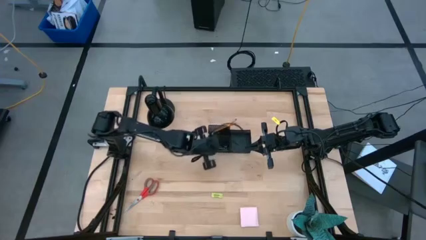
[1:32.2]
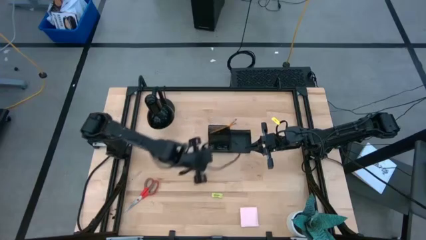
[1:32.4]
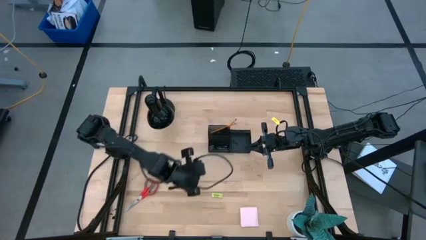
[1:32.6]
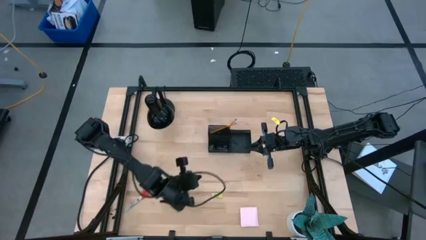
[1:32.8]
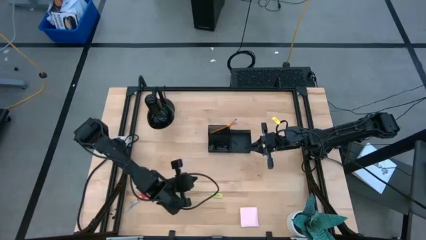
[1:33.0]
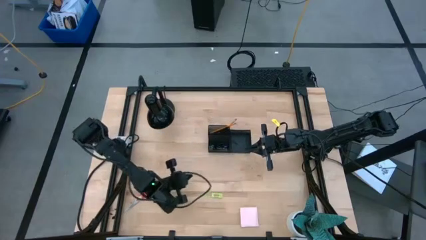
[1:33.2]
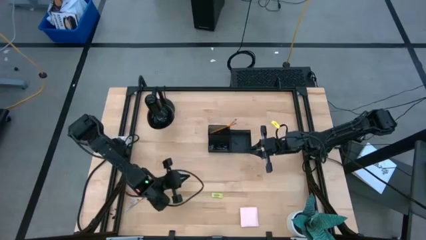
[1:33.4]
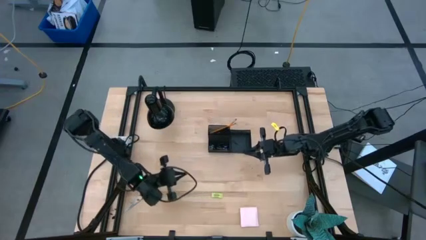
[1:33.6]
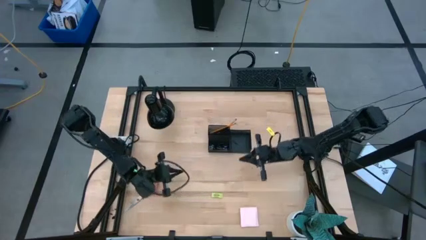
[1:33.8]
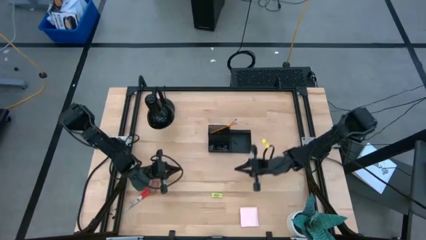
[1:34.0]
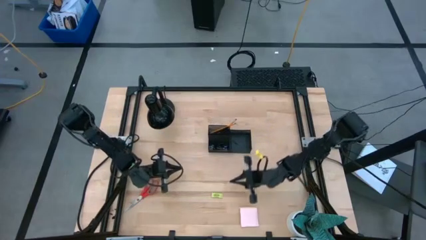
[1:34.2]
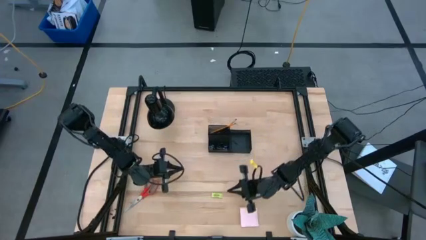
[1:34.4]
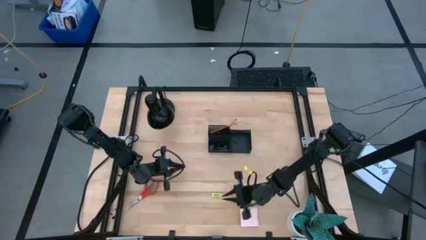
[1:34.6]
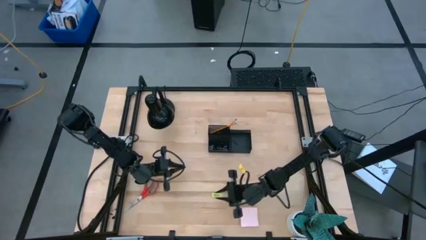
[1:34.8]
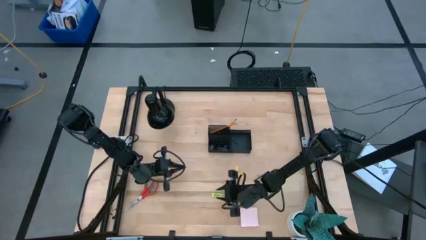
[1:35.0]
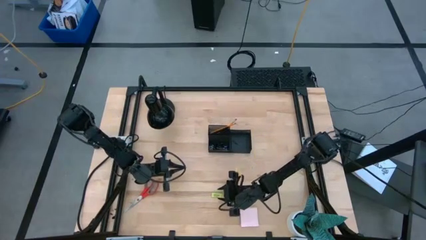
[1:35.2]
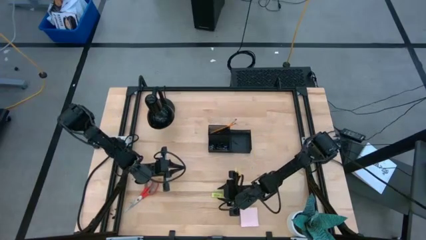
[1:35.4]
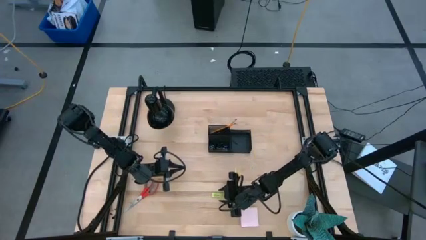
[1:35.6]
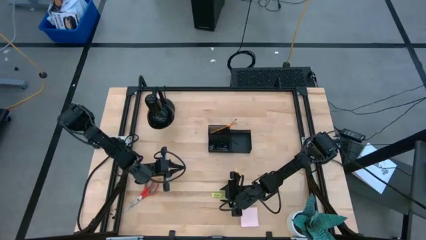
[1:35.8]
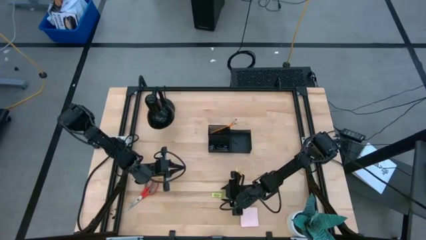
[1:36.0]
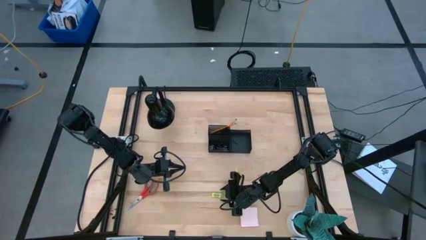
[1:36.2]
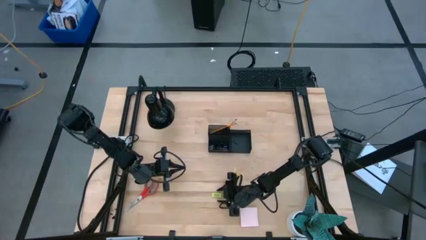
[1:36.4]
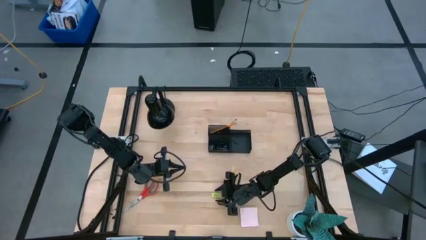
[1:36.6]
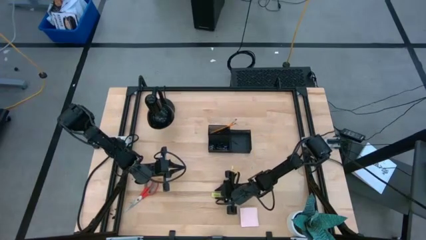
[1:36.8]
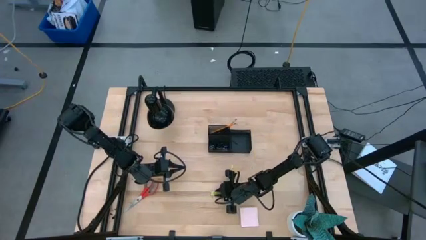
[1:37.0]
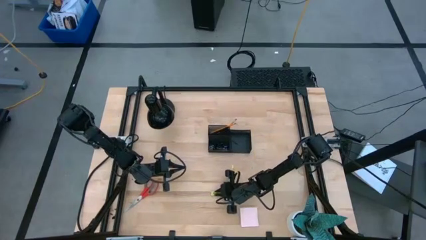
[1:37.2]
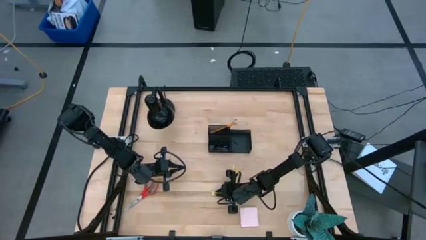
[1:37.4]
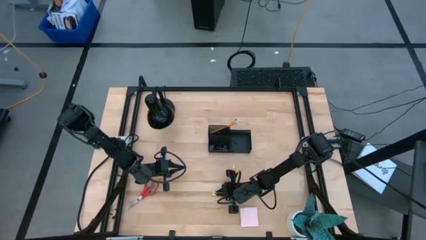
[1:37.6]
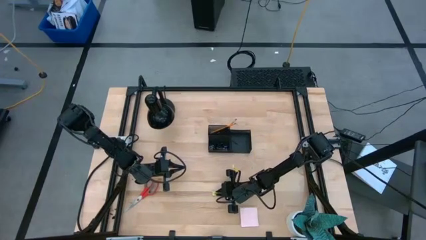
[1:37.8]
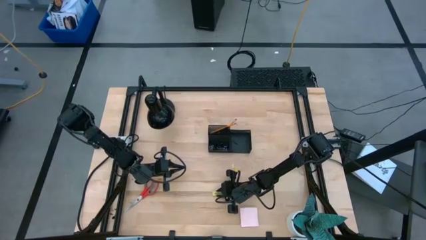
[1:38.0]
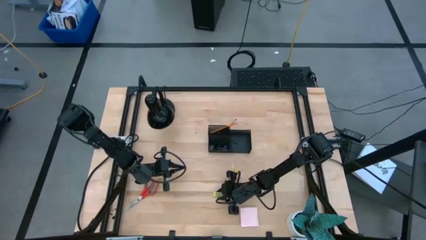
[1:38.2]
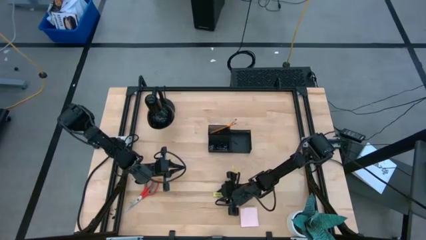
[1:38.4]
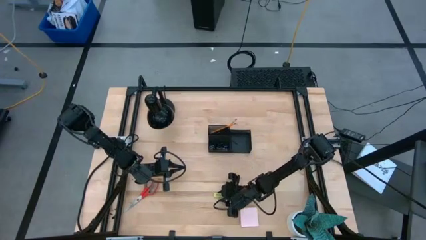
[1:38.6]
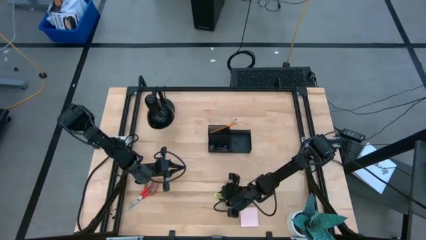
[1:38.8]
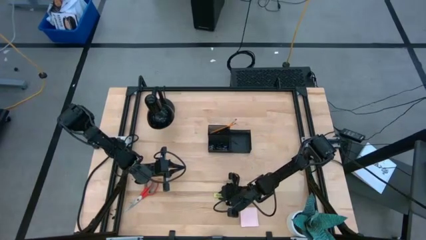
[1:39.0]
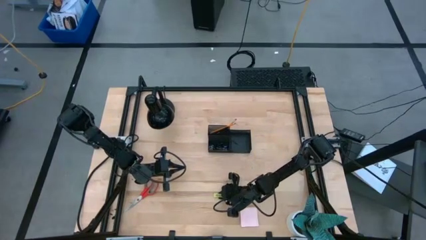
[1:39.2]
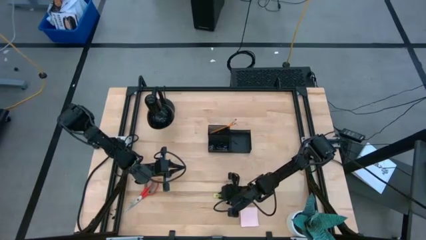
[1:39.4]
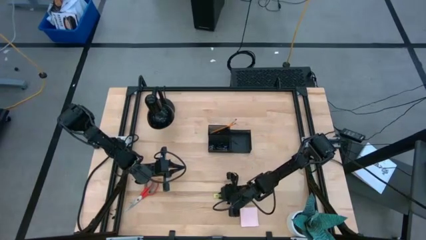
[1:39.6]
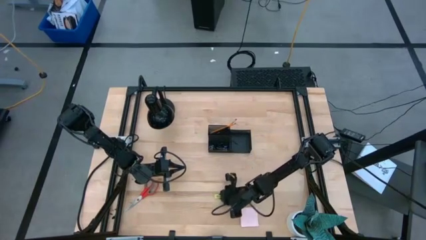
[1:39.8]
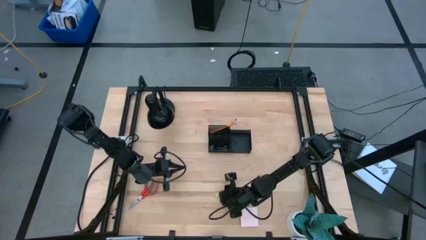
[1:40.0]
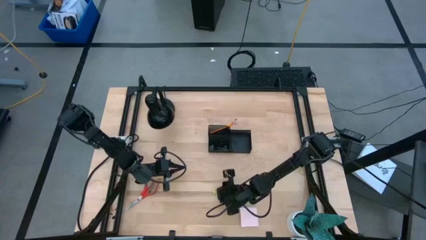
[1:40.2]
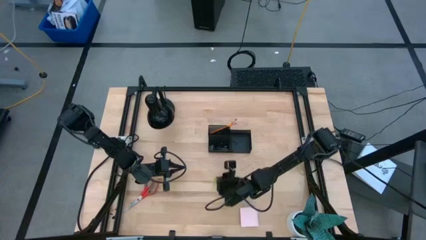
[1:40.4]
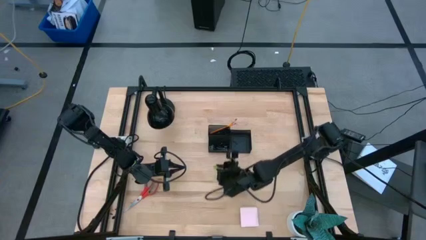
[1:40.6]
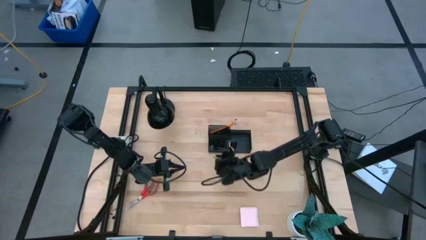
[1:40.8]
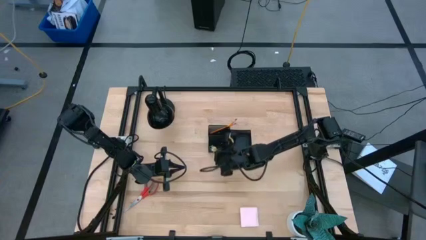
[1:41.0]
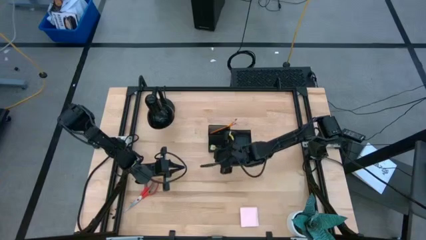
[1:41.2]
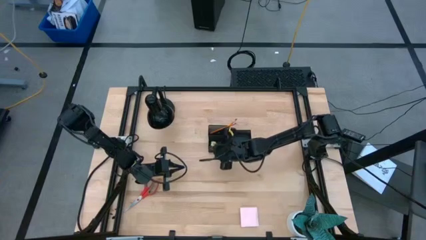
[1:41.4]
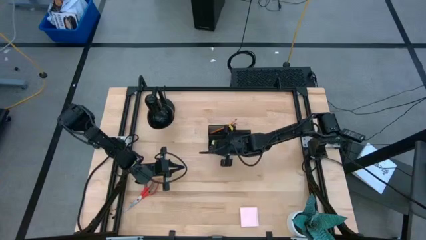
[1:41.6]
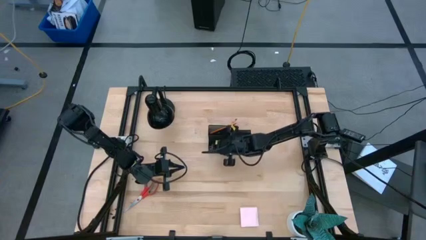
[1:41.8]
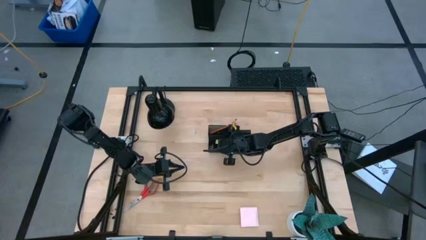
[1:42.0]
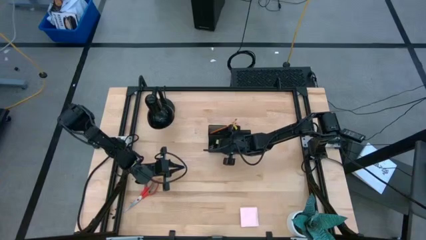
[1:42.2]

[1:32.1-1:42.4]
Task: Pick and place office supplies into organizer
Put the yellow eraser into the black desk organizer

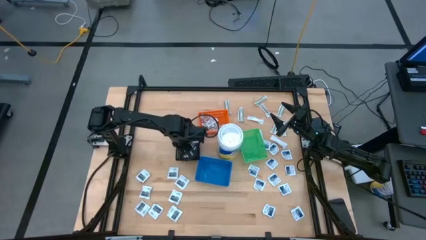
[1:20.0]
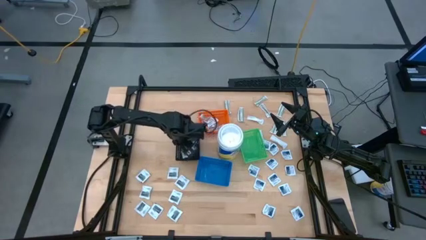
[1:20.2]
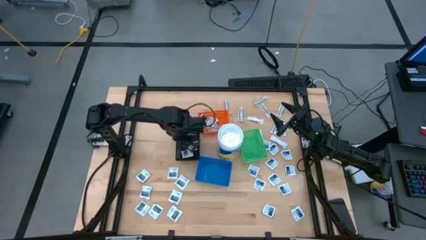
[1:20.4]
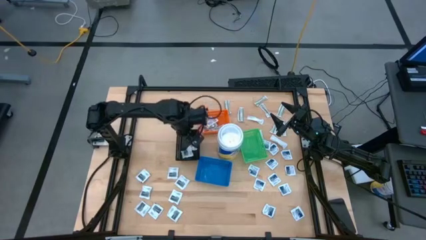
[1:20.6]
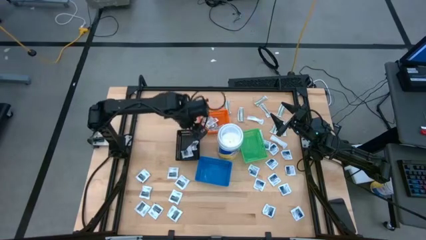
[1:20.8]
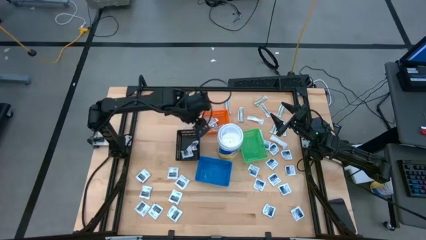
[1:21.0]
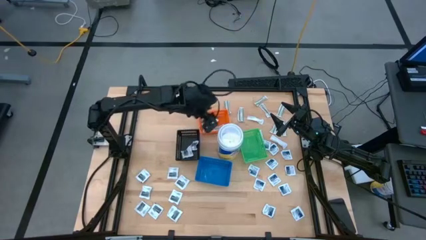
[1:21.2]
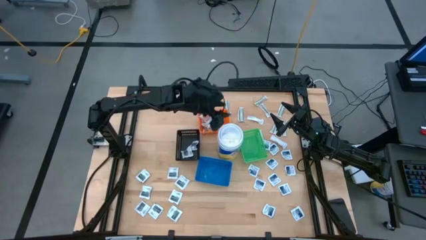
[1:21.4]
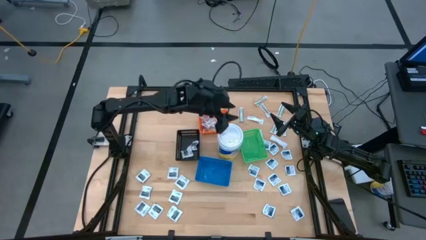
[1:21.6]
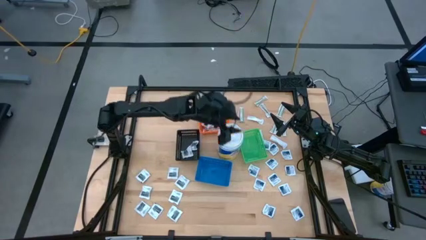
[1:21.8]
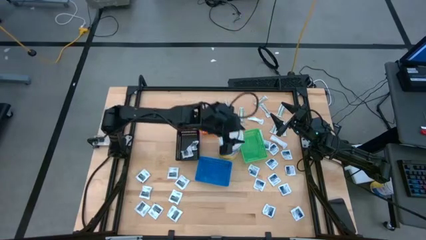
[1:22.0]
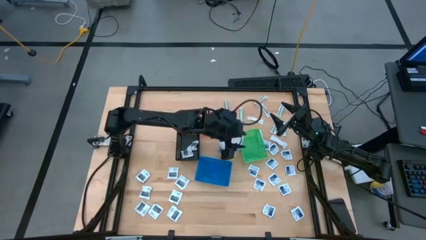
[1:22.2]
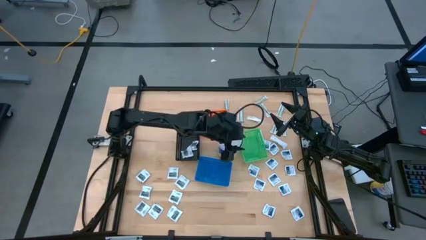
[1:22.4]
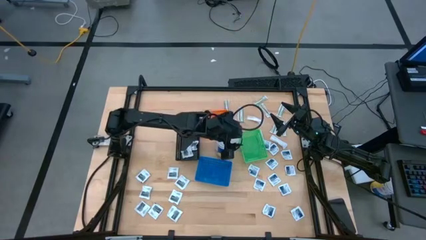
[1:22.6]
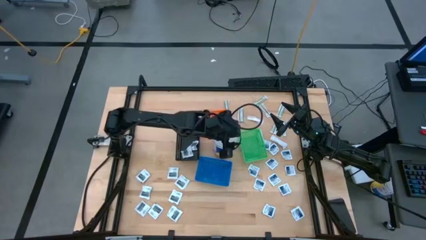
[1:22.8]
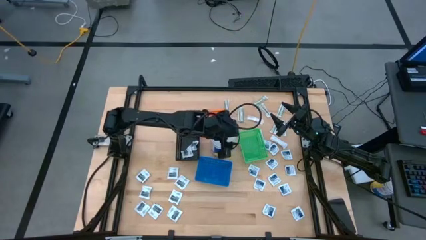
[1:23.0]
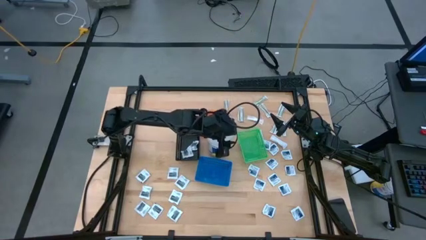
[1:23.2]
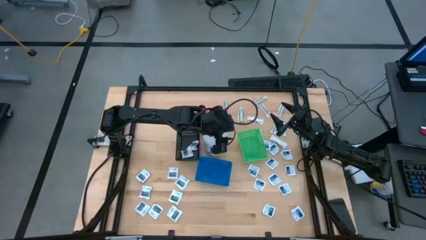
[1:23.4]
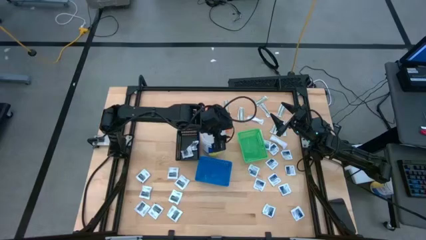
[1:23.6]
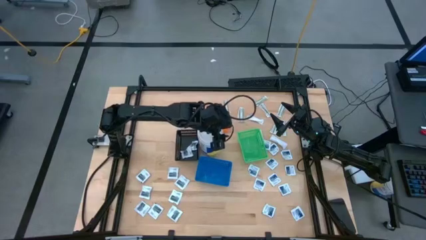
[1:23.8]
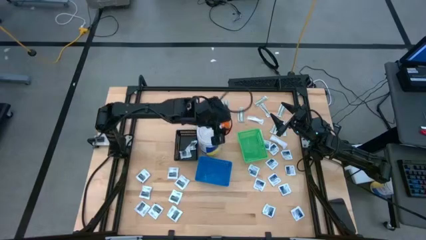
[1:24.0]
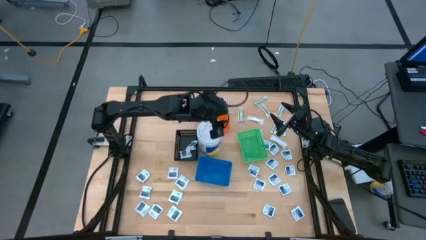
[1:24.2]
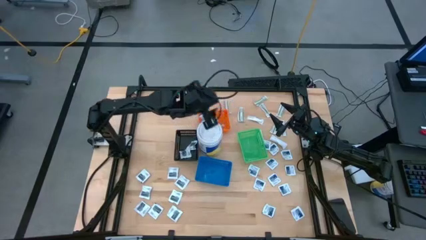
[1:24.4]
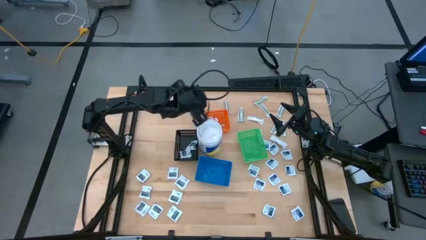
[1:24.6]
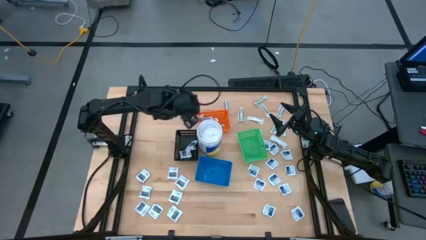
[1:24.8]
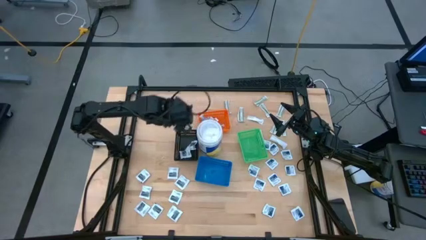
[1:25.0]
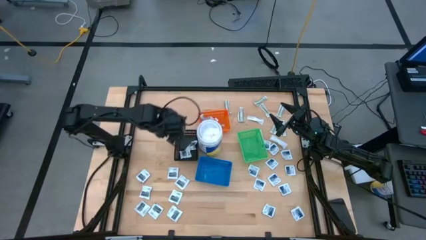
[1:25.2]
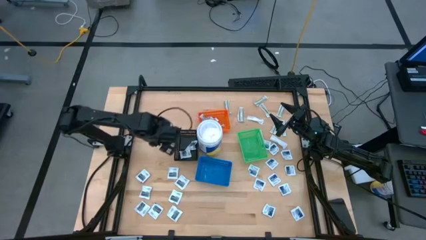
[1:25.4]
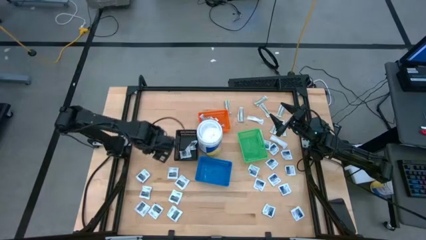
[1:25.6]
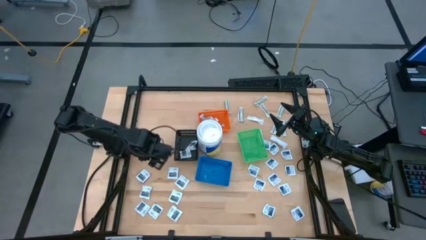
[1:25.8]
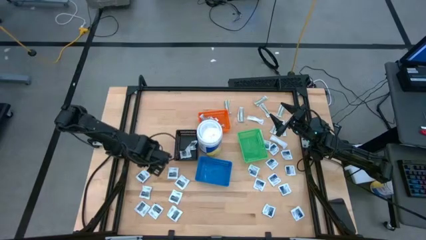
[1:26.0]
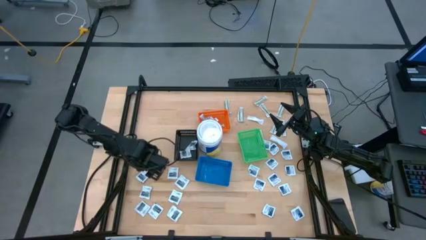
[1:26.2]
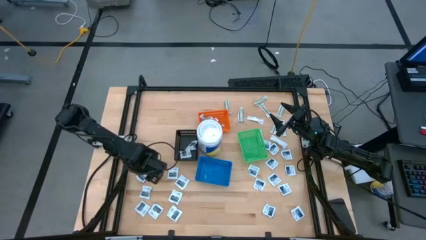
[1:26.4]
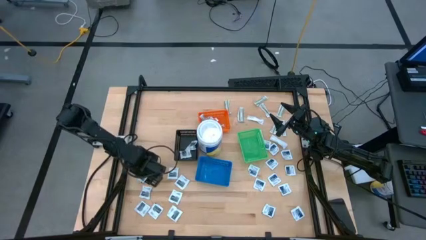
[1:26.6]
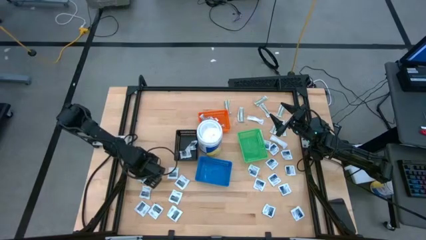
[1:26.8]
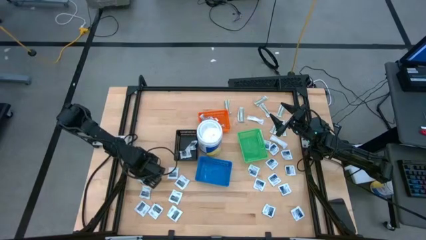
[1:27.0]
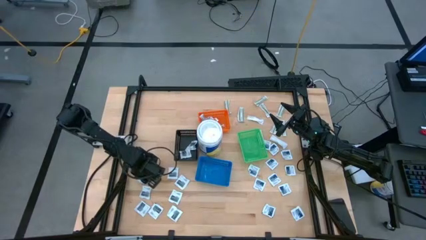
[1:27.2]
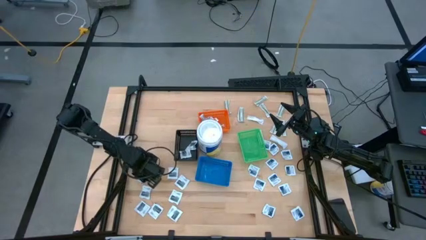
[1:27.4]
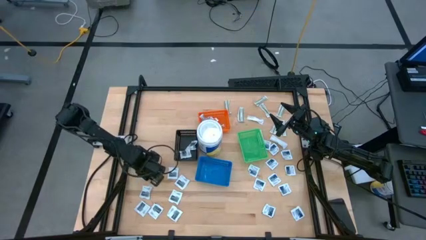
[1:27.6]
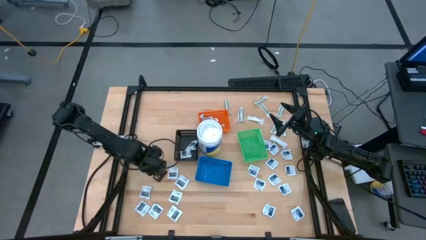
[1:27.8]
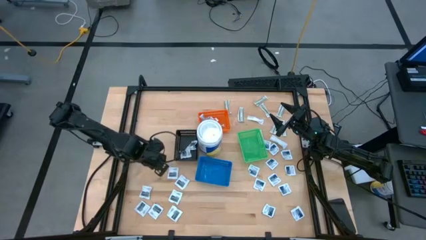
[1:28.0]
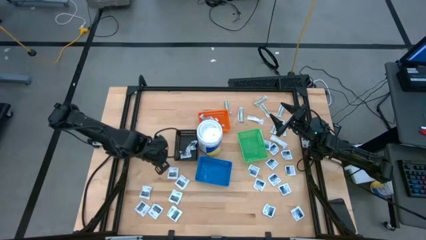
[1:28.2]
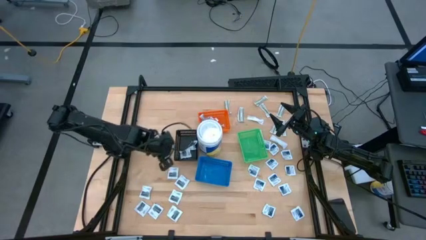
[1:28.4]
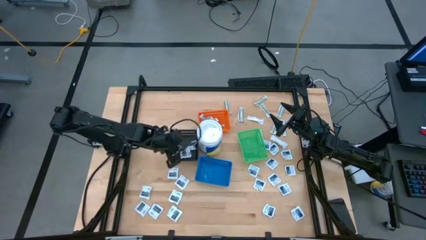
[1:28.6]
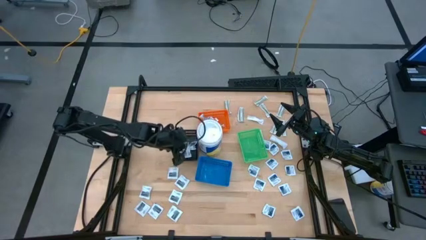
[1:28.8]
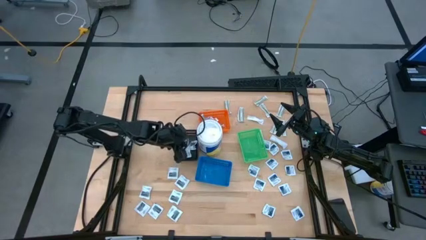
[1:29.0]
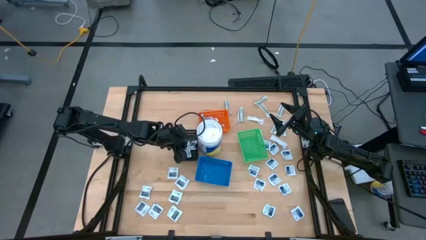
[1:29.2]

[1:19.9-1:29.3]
Task: Pick & Place First Aid Supplies
Put the gray towelette pack into the black bin
